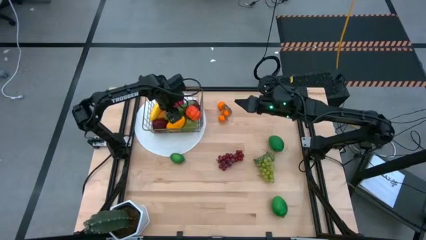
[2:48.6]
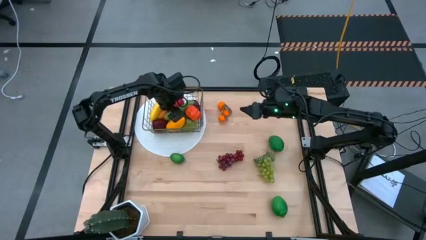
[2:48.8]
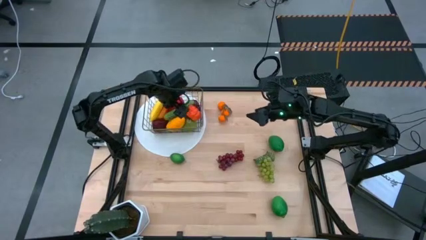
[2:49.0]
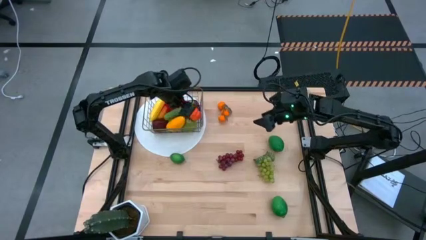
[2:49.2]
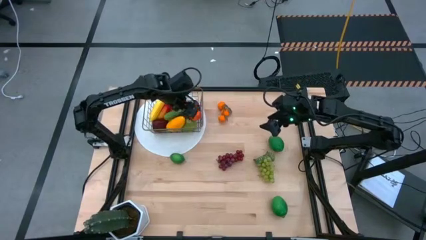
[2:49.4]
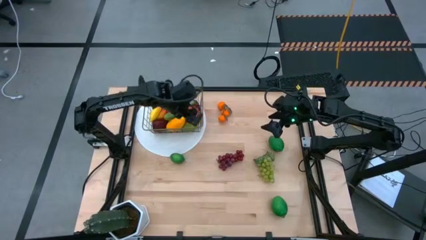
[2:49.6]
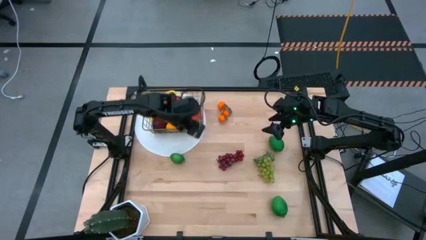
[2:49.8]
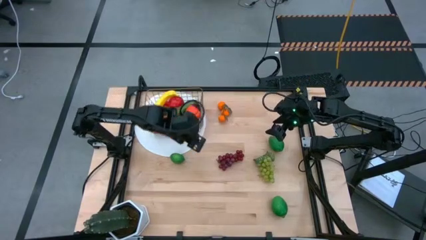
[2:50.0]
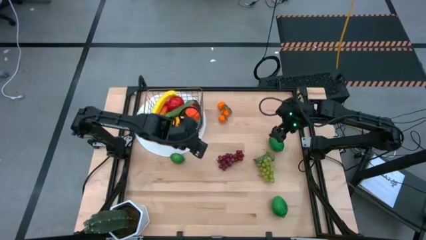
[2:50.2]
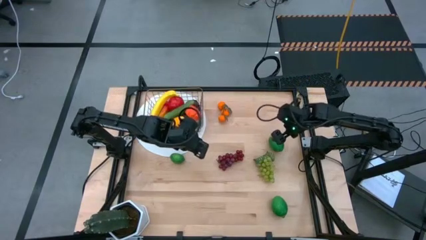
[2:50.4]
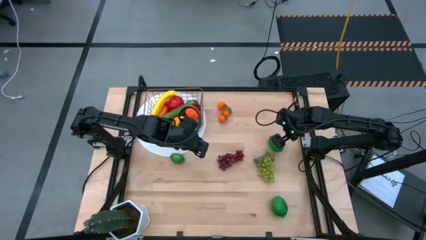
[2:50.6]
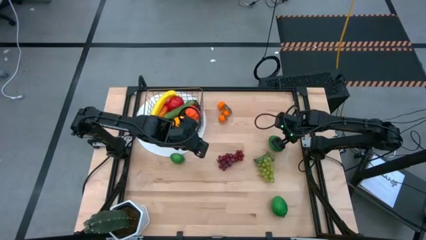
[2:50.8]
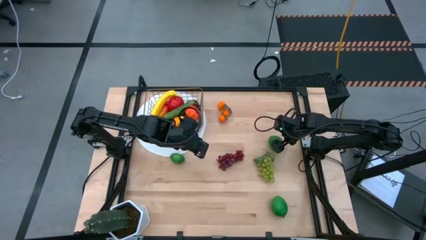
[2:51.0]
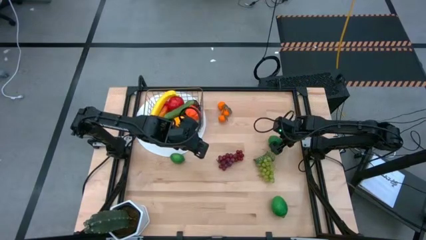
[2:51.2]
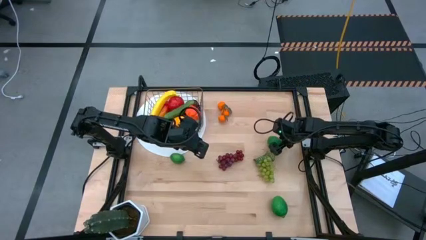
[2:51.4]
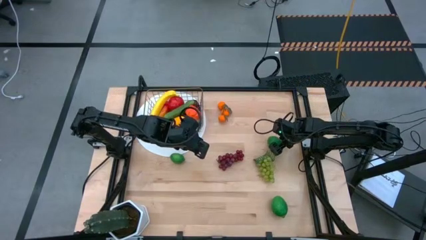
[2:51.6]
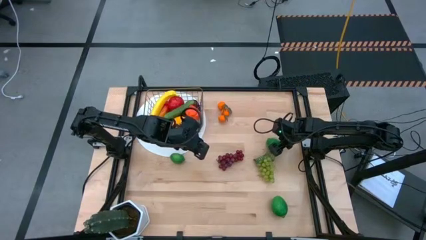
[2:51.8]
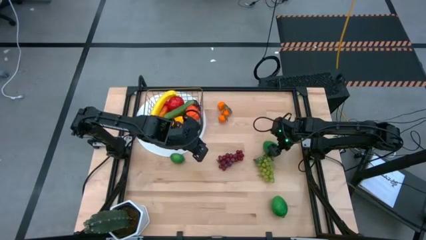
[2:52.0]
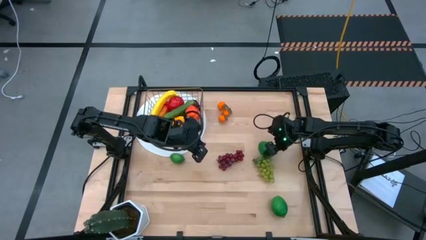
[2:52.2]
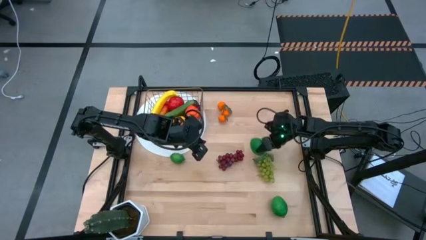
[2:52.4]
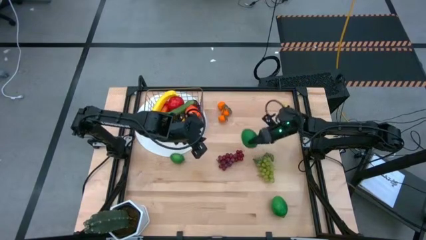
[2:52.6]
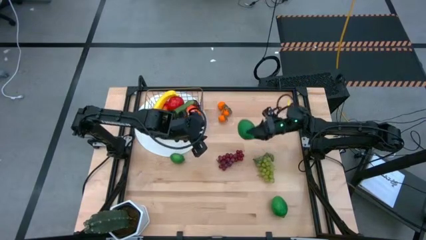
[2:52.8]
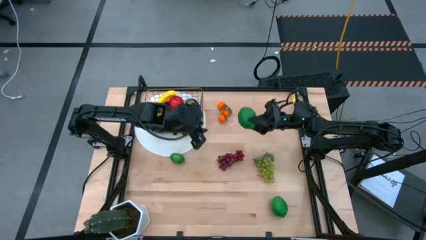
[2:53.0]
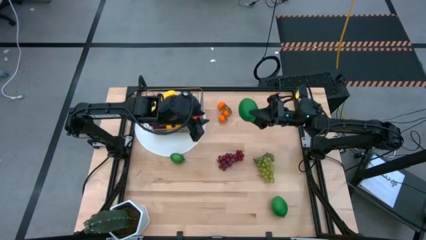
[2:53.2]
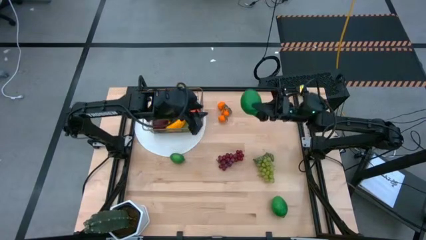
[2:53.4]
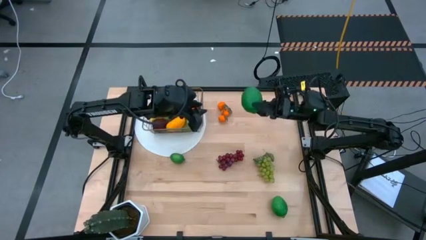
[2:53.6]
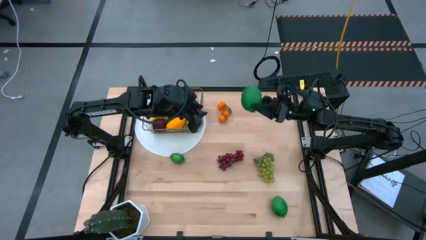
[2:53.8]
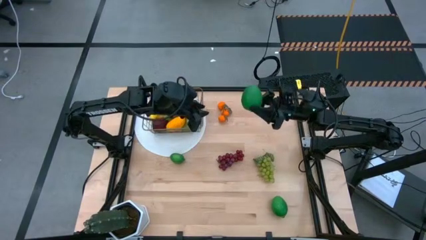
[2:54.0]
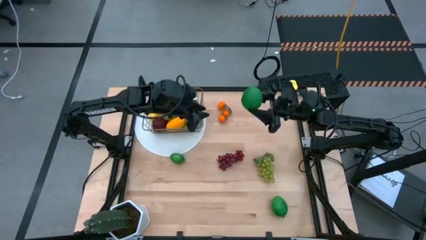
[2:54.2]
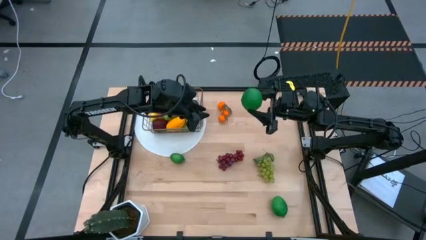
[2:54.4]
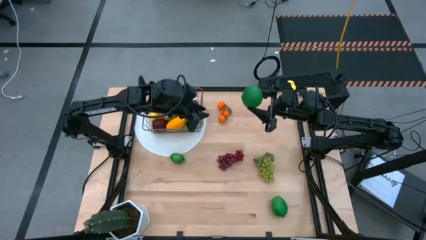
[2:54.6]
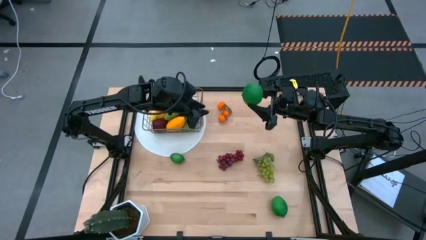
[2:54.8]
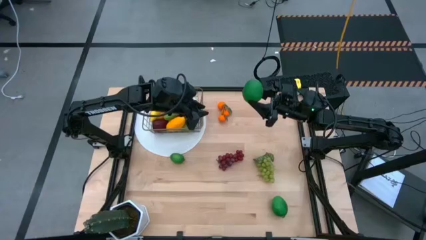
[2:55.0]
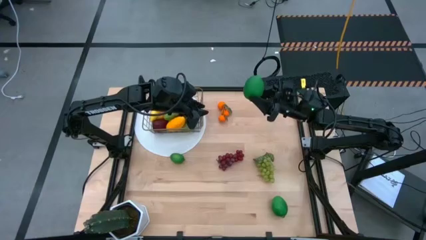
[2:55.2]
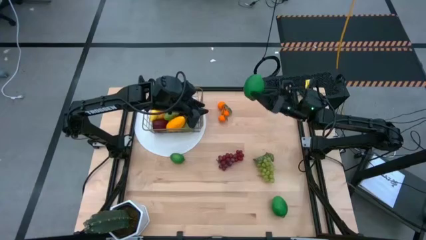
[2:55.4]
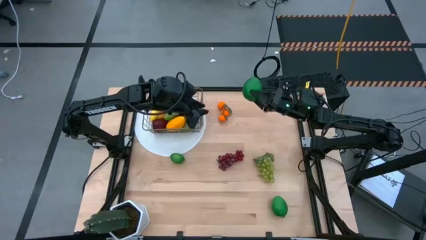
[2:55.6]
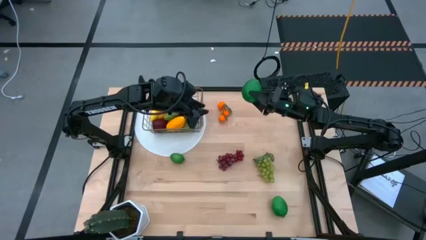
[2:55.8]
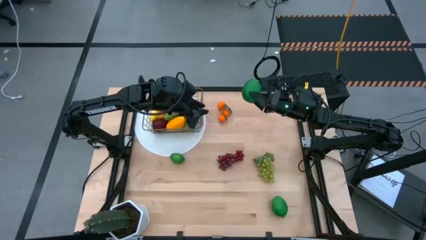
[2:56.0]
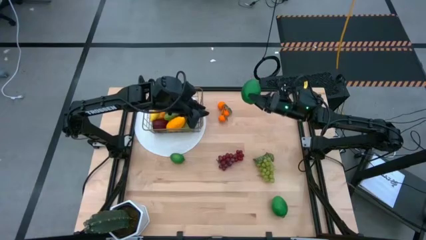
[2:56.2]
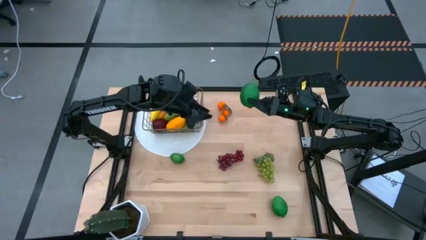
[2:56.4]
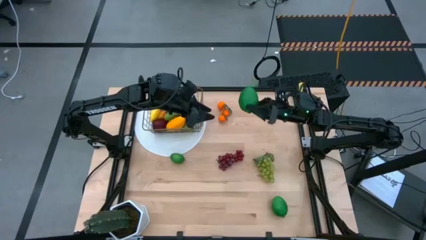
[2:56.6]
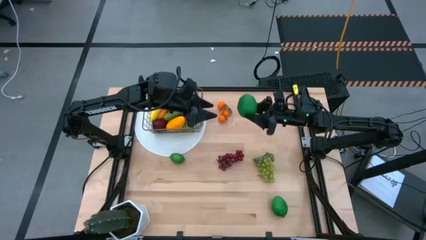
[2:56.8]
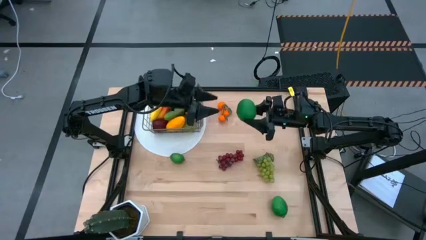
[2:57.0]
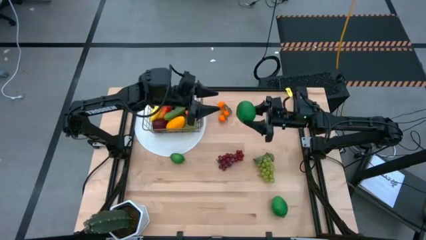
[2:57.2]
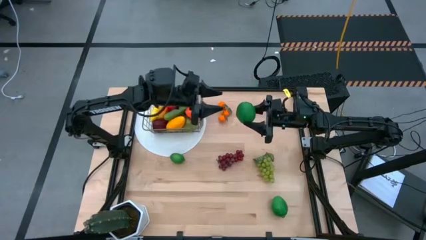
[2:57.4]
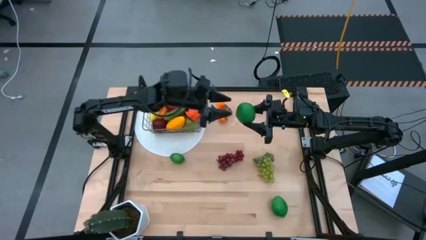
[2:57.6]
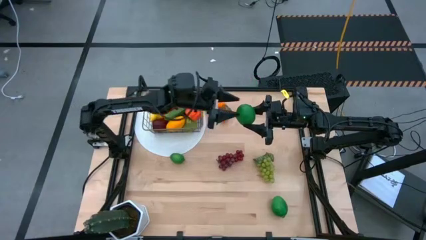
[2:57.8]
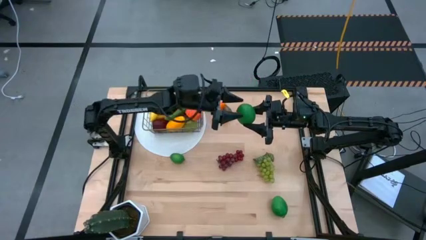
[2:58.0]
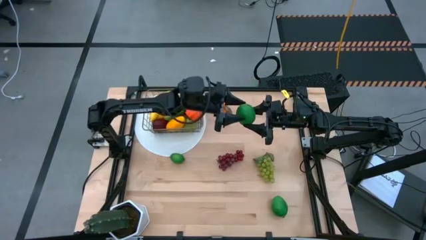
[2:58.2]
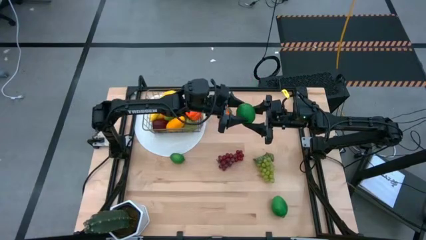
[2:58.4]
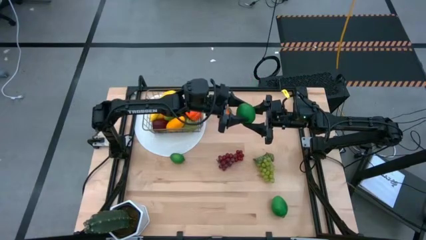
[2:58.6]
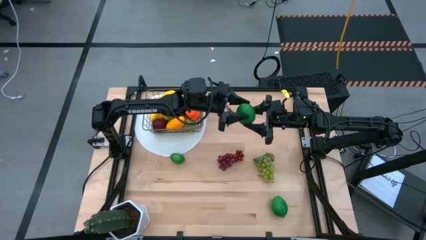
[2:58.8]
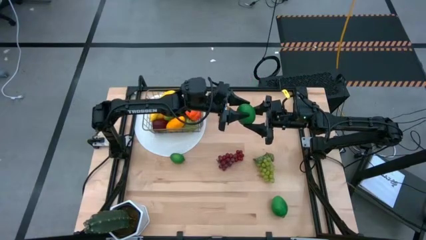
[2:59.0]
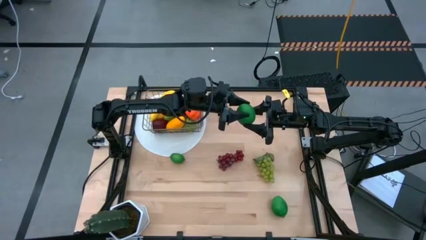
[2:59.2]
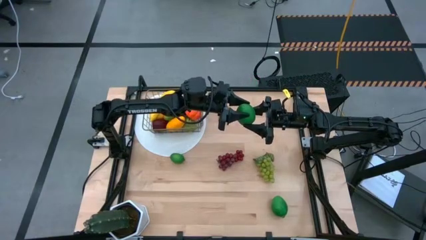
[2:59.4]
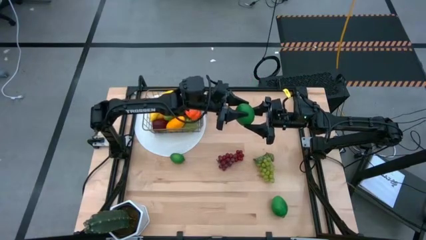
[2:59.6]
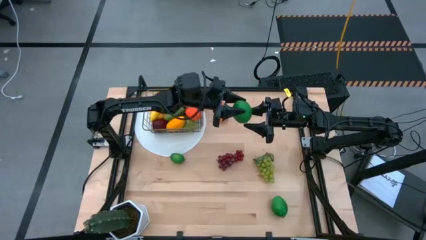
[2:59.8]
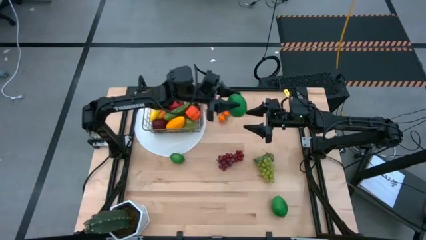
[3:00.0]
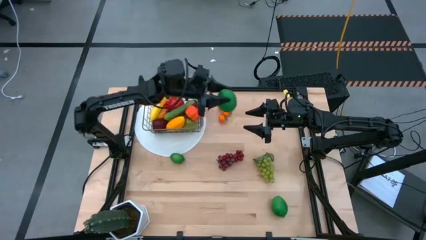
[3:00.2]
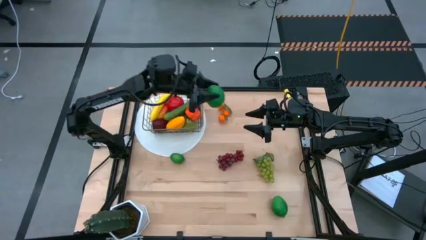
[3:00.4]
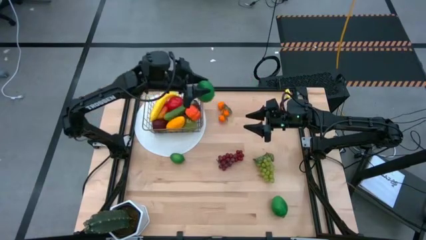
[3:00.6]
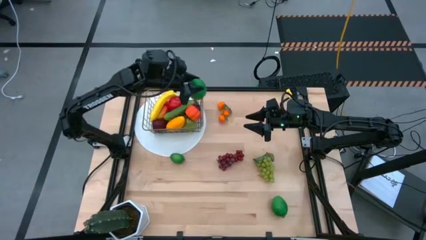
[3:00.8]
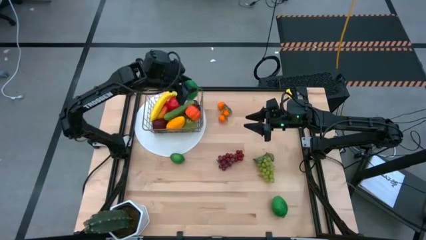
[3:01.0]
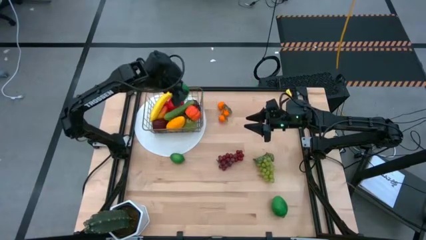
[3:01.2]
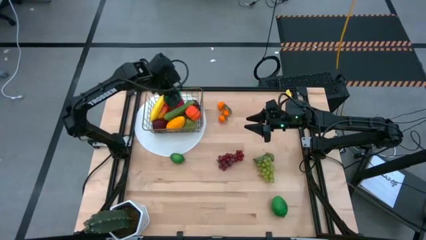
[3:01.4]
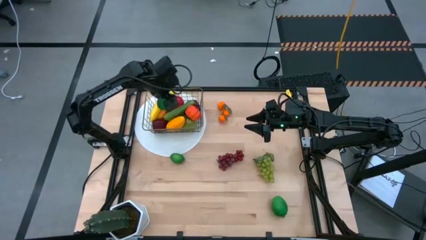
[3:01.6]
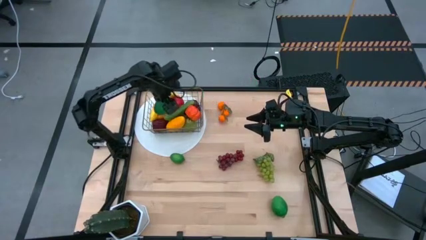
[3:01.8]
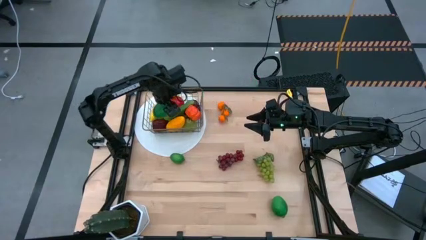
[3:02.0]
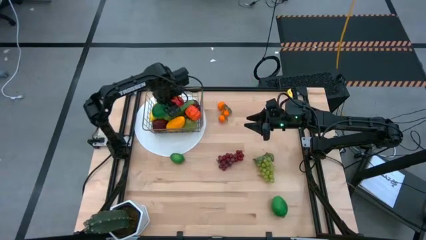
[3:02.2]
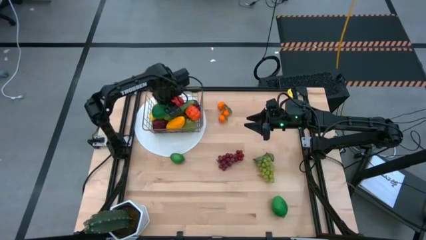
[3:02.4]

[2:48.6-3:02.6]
Task: Build produce basket
Put the top lime into the wired basket

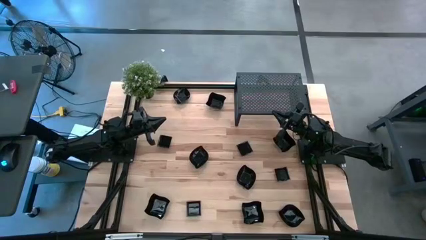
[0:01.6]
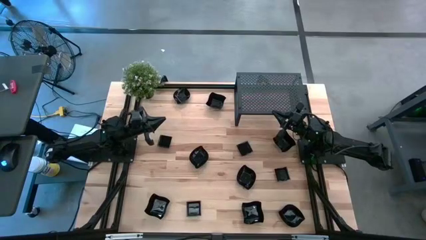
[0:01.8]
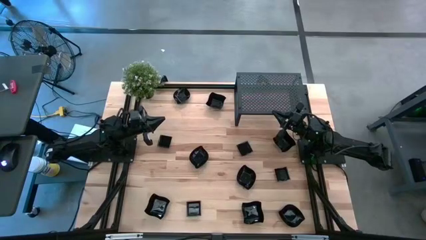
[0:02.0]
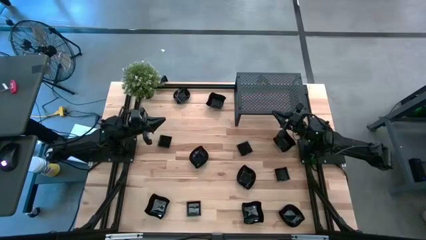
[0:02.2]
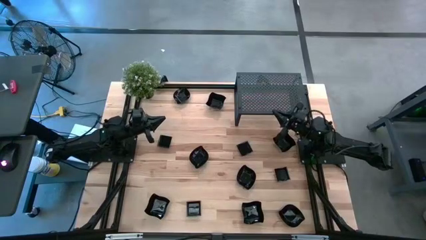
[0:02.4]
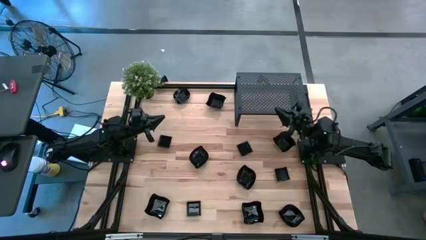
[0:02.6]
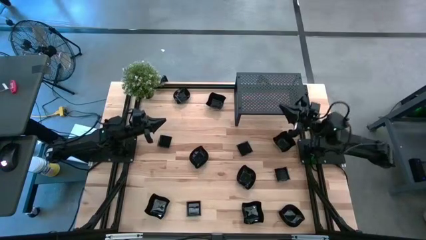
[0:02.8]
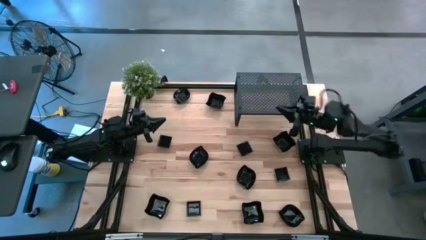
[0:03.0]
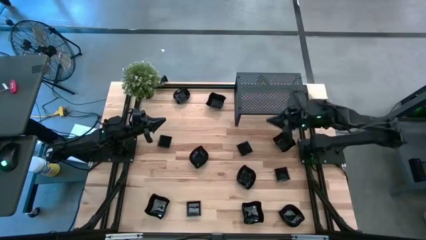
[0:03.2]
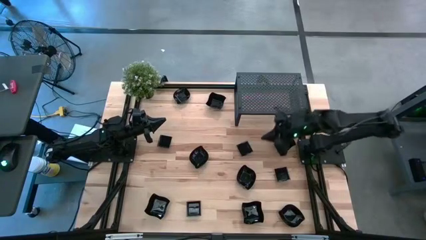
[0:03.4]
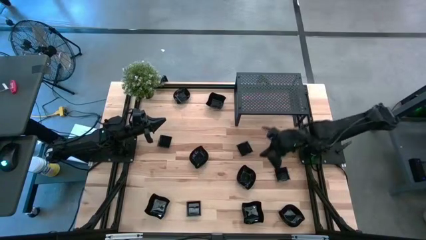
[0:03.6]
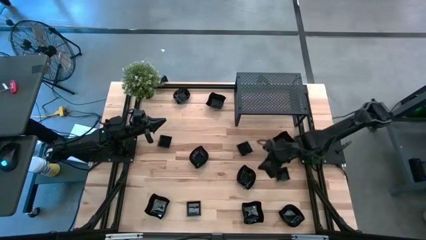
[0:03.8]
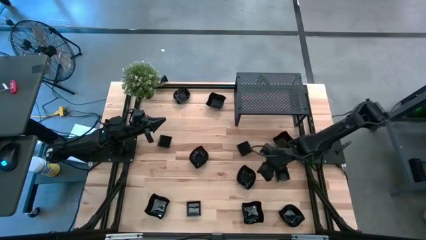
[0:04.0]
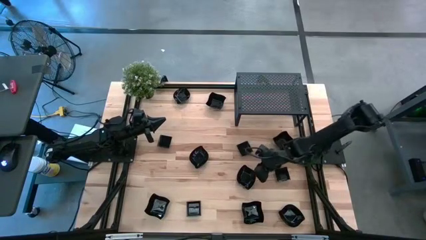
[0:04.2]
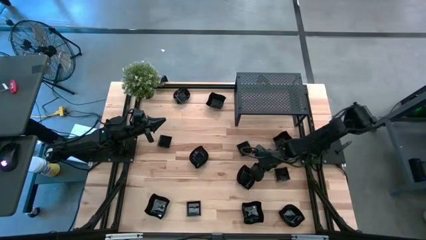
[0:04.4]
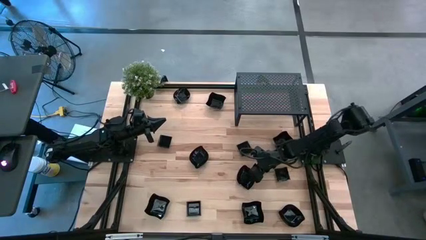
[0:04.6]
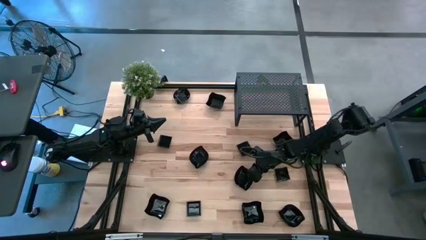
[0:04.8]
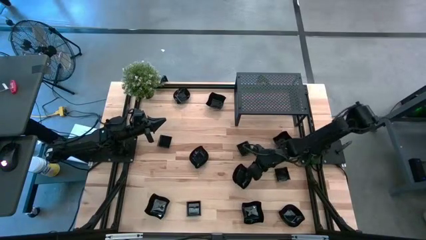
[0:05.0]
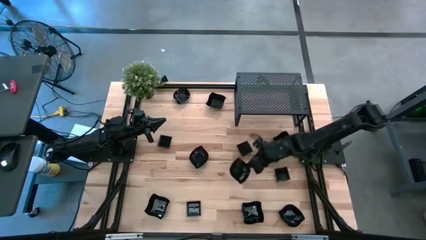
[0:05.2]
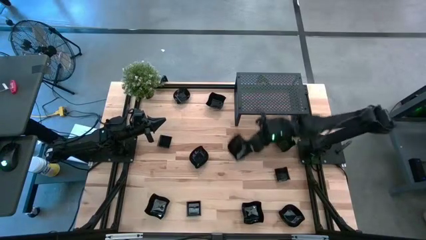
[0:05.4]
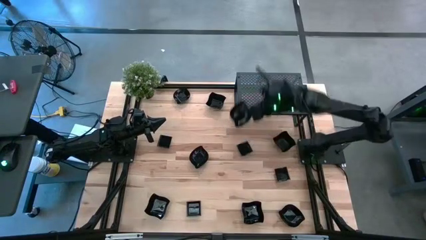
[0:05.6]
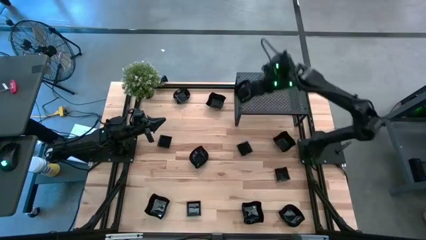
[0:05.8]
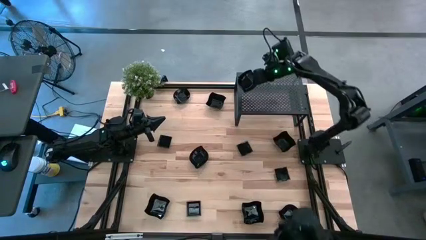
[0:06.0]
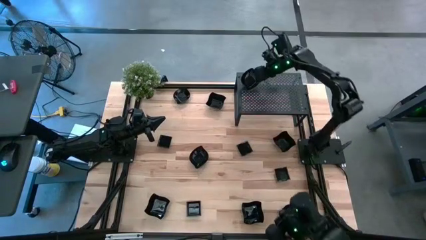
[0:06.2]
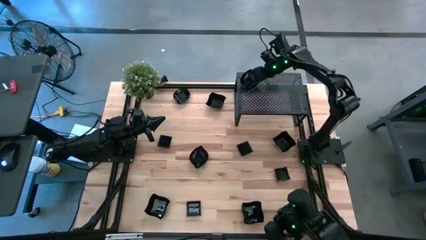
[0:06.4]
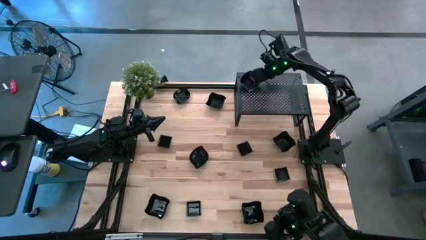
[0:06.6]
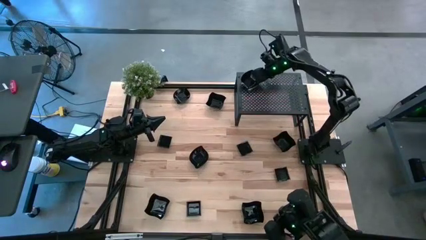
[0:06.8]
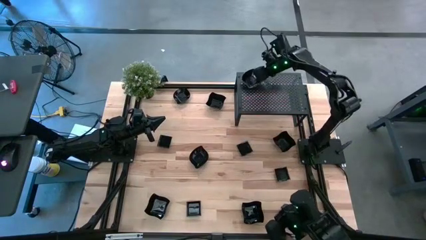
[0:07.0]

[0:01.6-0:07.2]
Task: Pick & Place Mini shaped plates
Put the black leaf-shaped plate on the shelf
